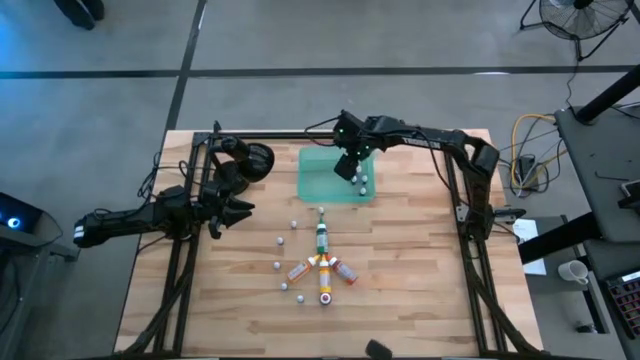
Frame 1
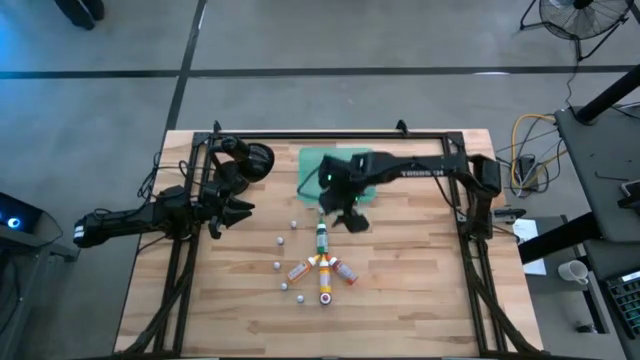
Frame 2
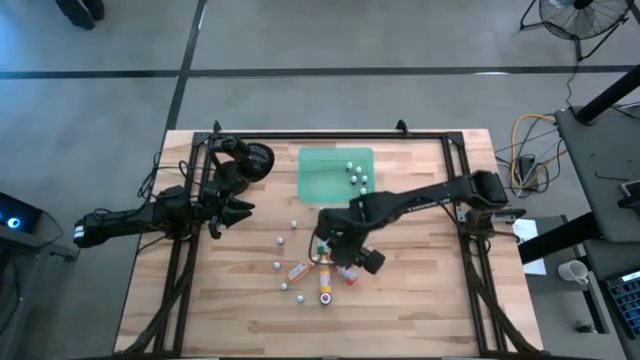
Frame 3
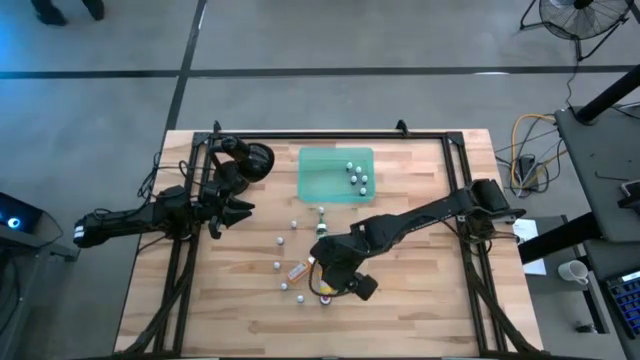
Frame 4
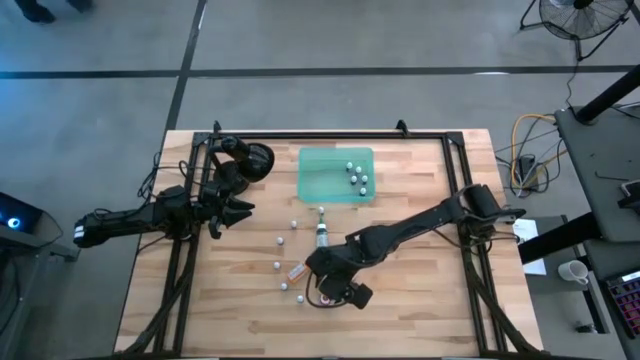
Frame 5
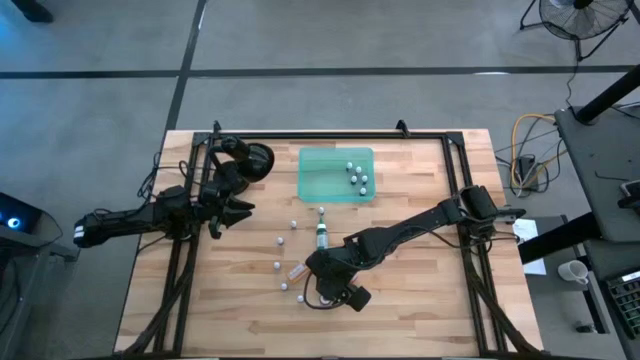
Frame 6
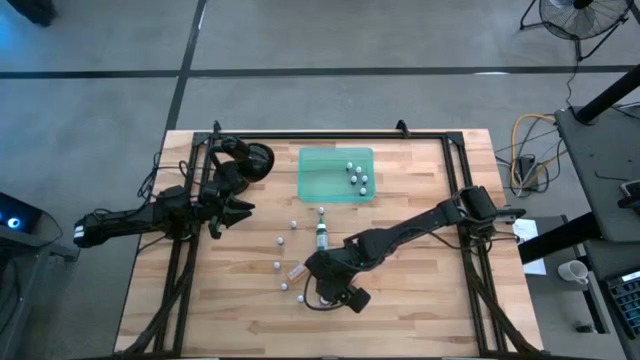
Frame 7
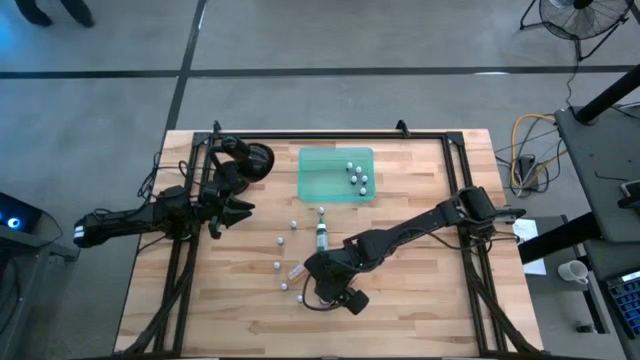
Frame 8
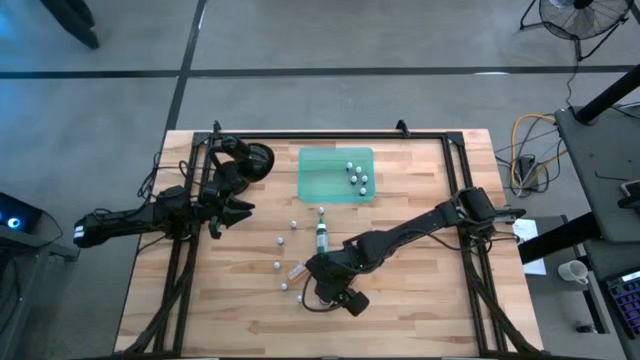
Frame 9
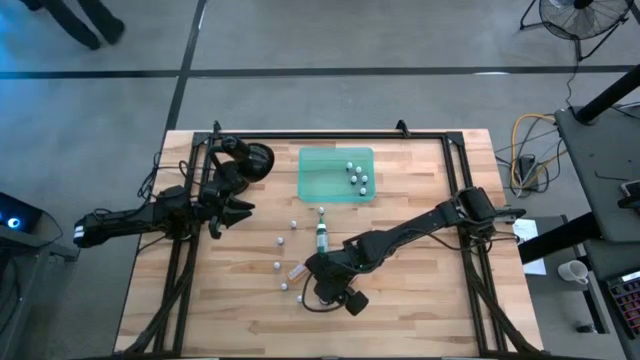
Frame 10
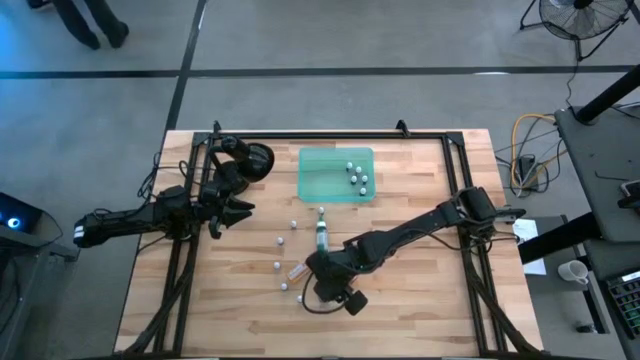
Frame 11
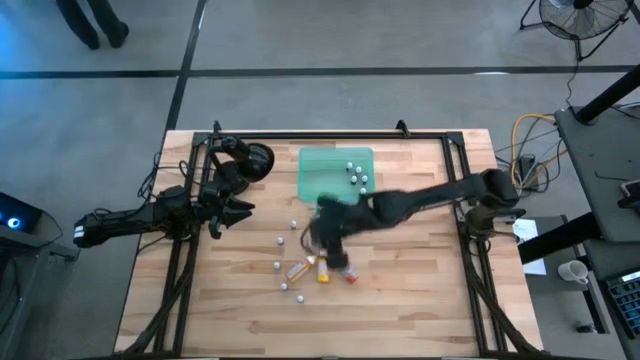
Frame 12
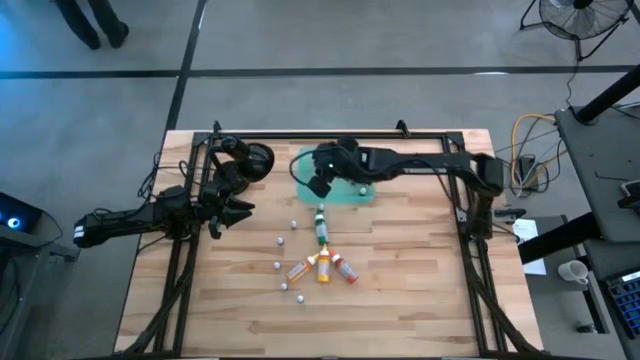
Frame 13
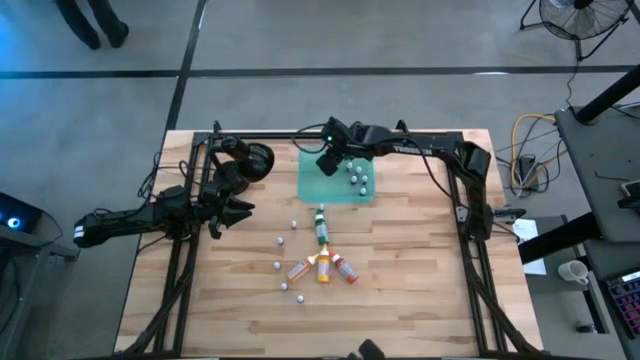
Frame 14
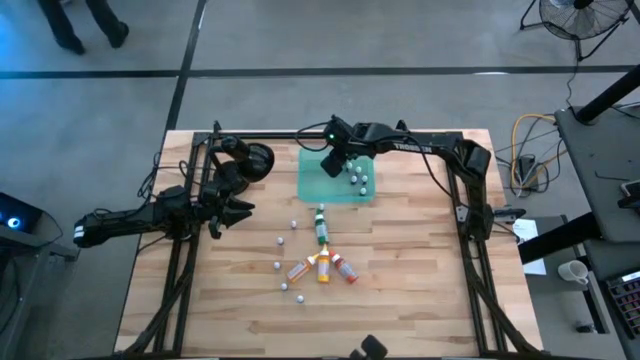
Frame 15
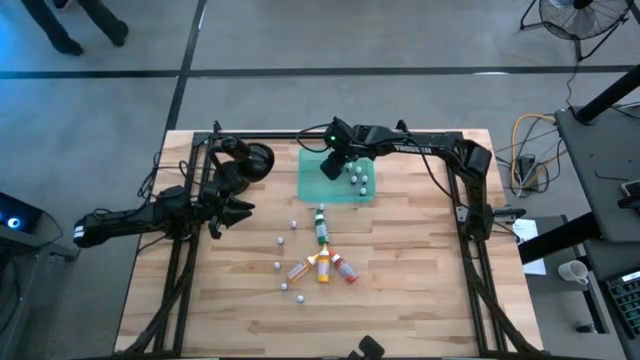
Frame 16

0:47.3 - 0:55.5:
Task: Pick & Place food coloring
Put the big red food coloring bottle into the bin

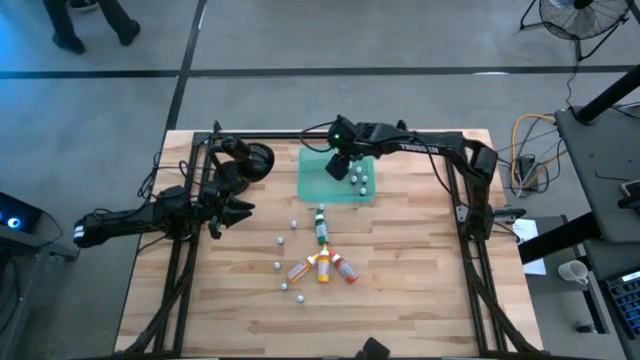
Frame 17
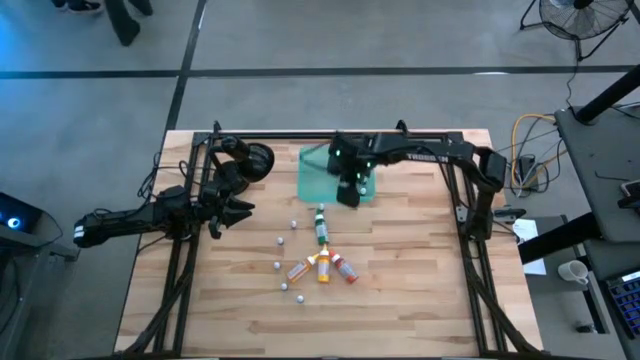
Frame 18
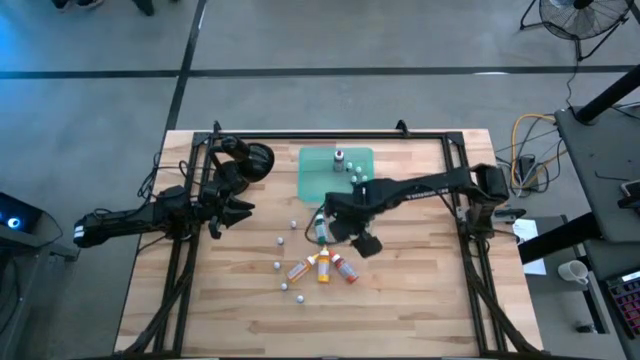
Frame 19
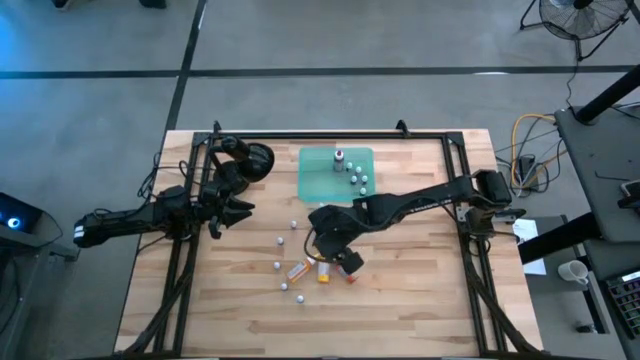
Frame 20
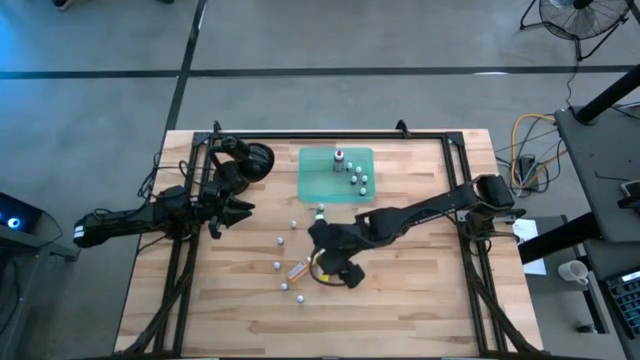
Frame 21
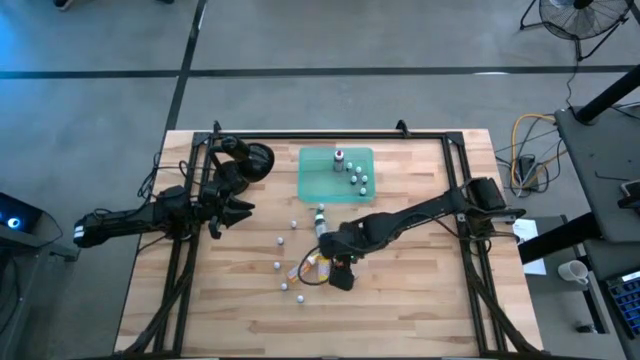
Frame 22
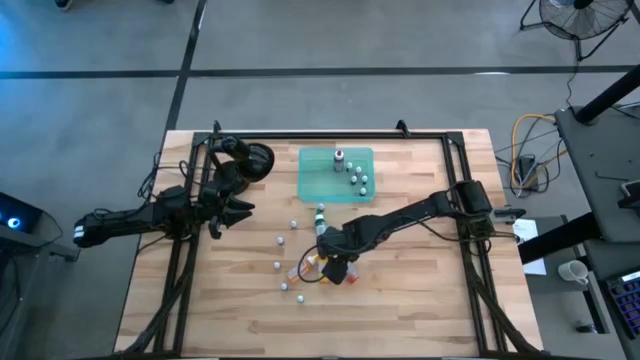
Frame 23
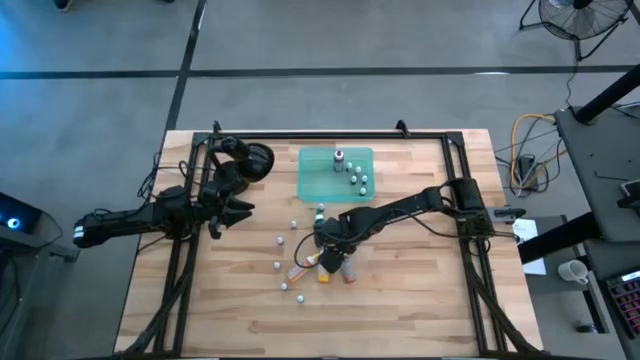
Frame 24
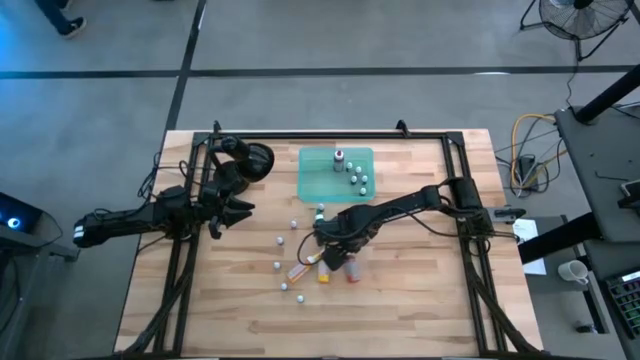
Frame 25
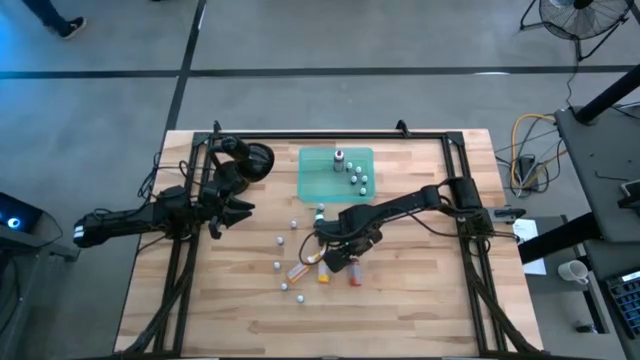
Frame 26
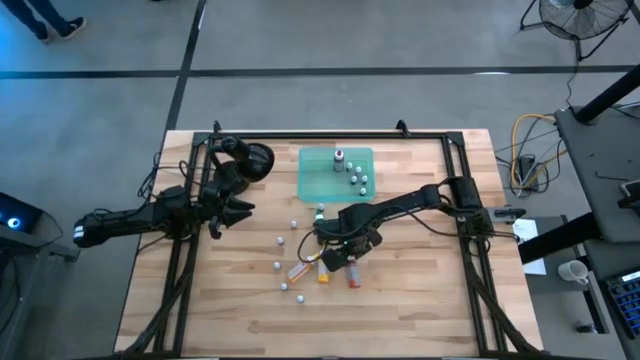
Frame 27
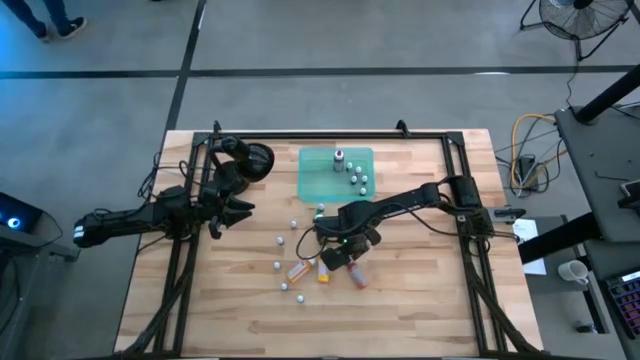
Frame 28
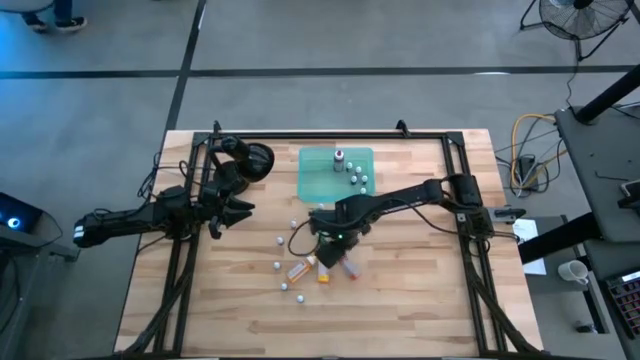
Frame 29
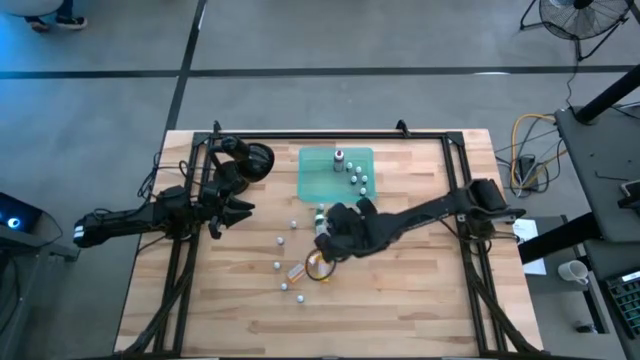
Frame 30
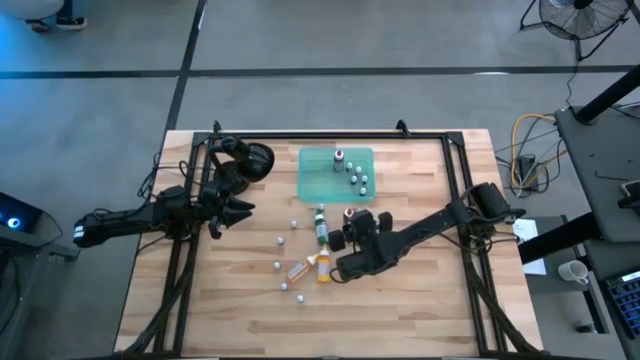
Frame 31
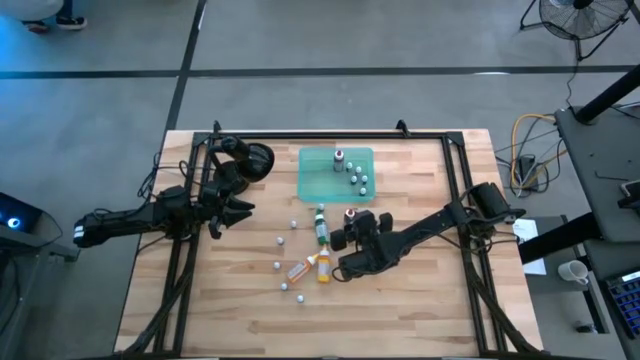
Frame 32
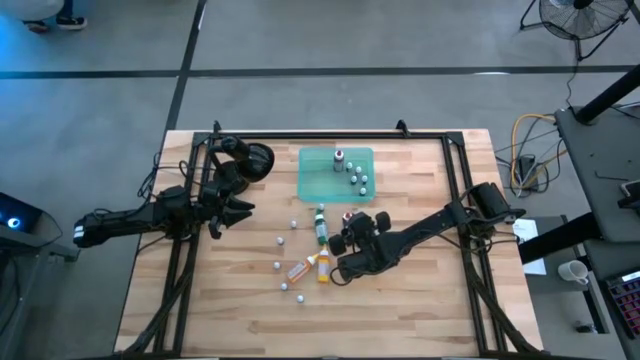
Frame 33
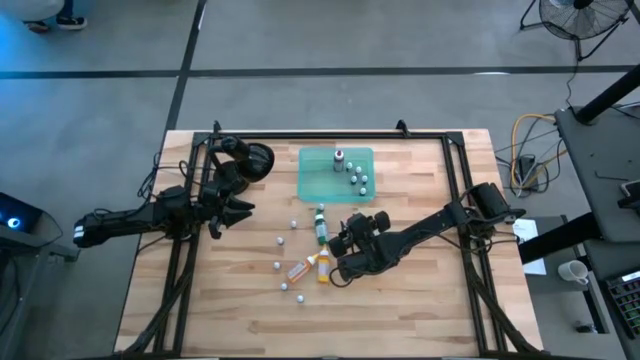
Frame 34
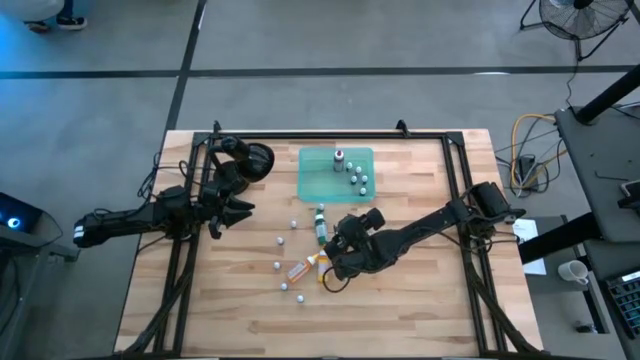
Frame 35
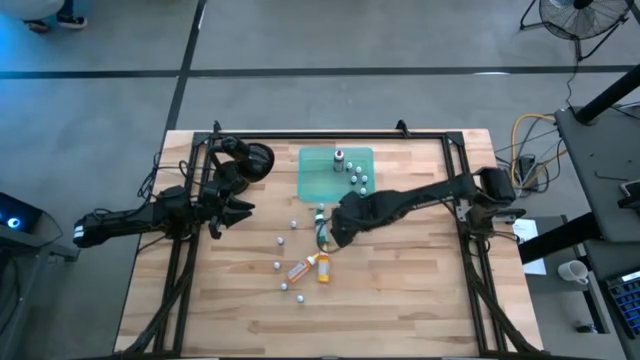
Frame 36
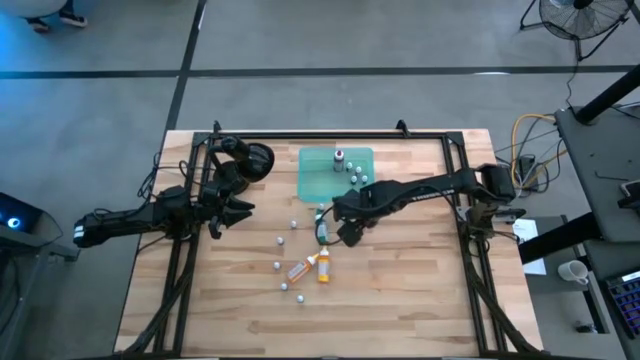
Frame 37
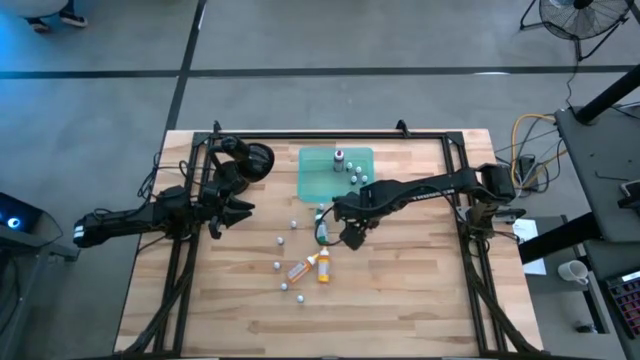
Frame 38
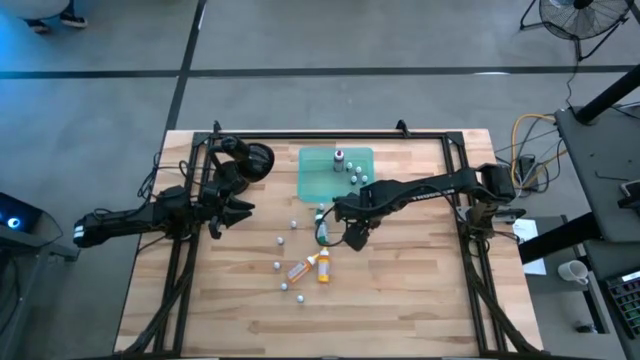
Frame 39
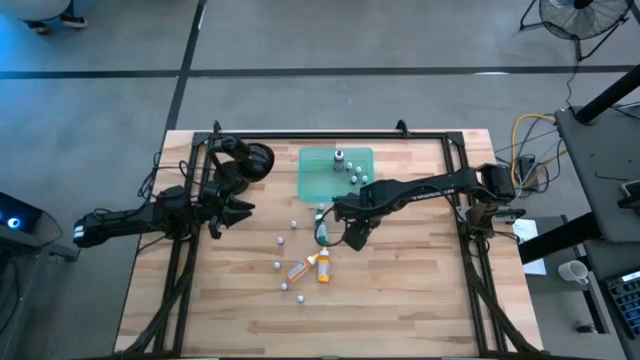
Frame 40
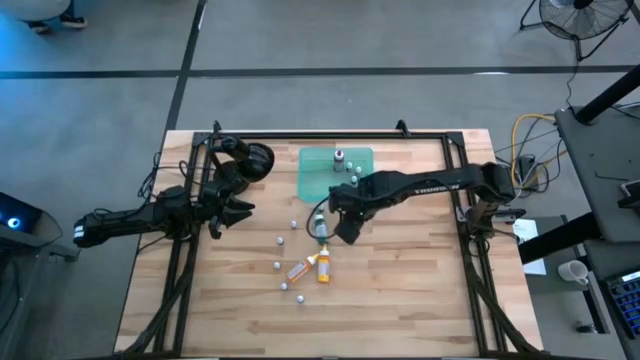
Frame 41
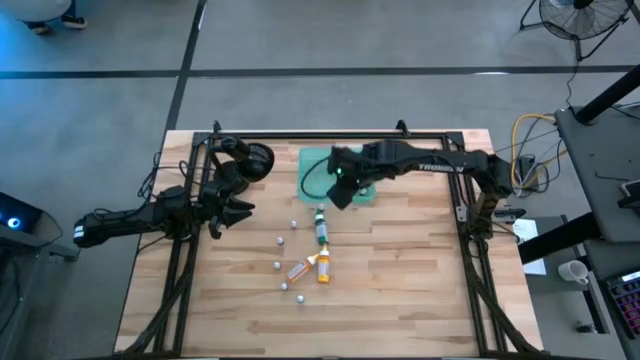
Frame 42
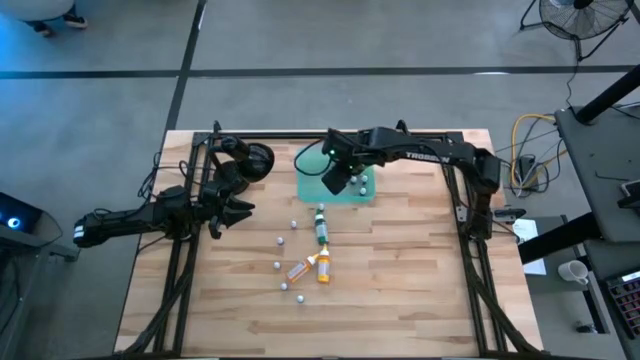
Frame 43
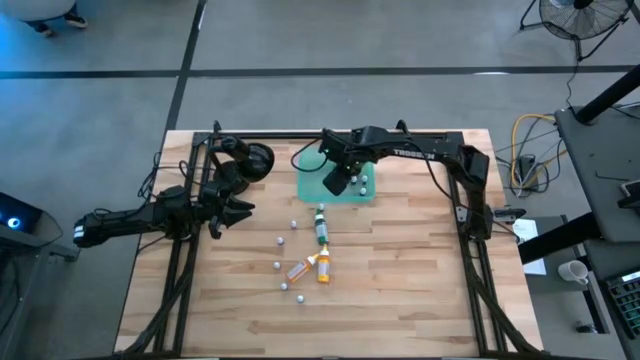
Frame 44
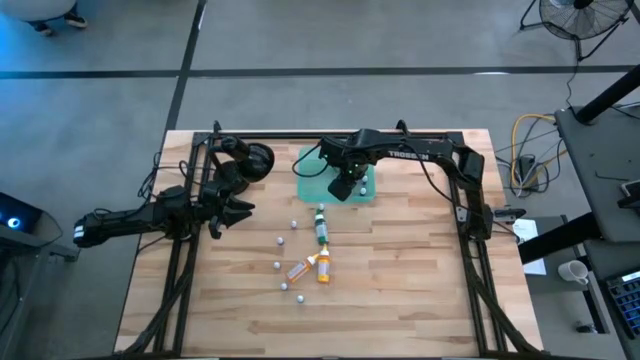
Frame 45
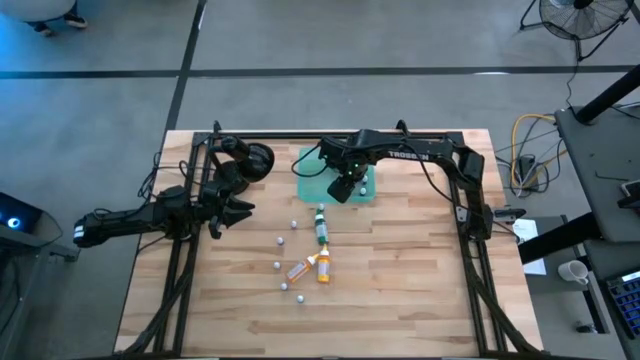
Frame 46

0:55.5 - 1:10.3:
Put the big orange food coloring bottle into the bin
